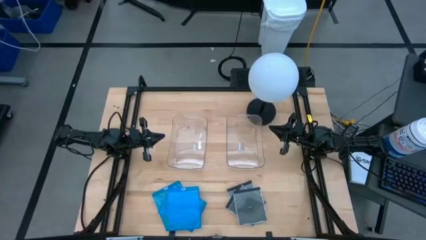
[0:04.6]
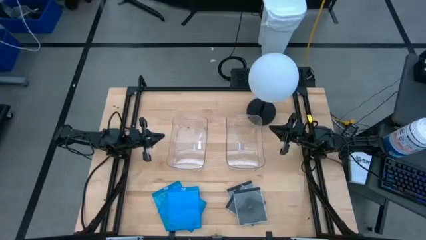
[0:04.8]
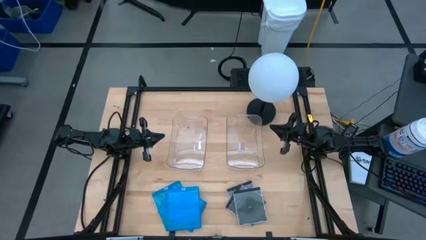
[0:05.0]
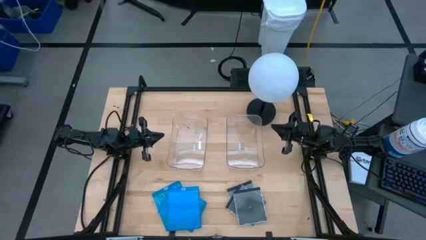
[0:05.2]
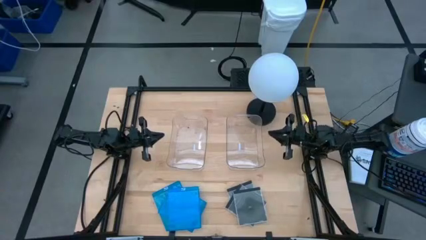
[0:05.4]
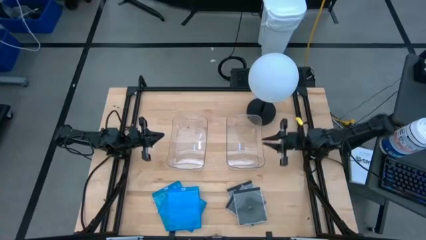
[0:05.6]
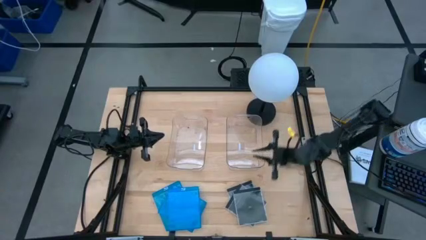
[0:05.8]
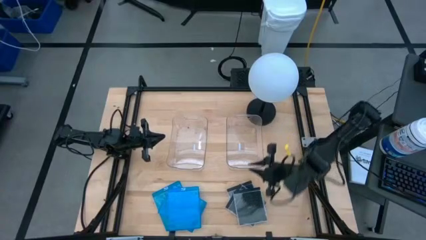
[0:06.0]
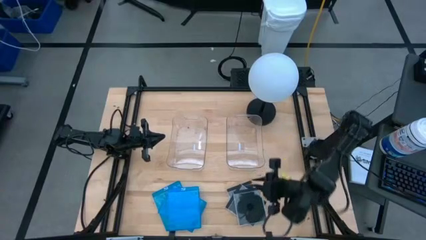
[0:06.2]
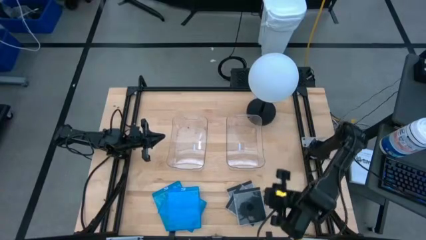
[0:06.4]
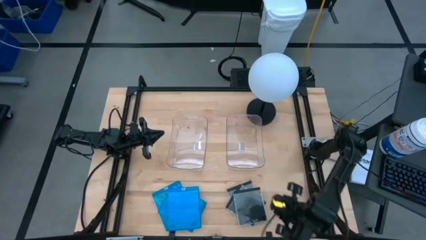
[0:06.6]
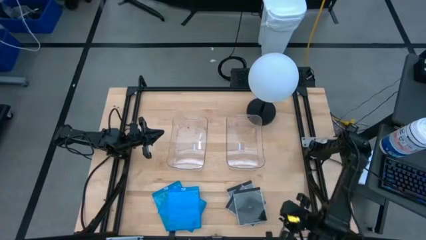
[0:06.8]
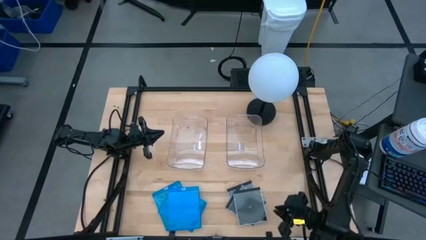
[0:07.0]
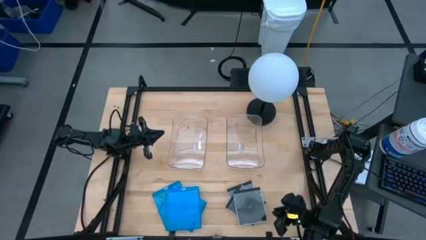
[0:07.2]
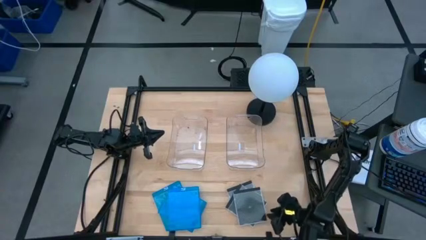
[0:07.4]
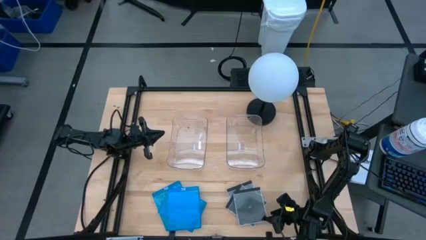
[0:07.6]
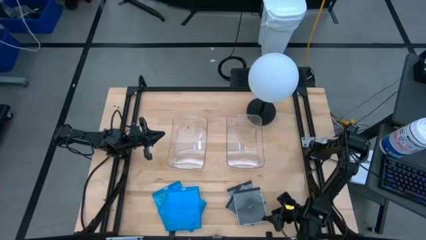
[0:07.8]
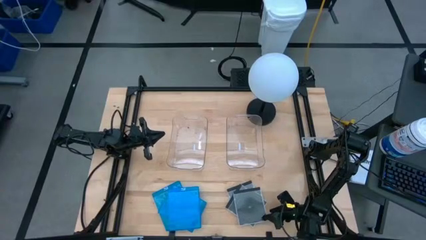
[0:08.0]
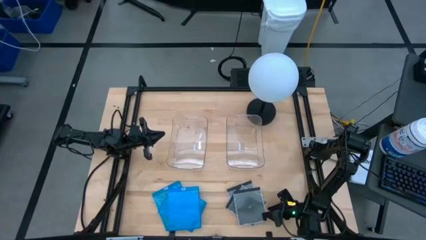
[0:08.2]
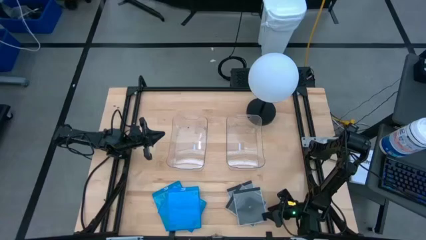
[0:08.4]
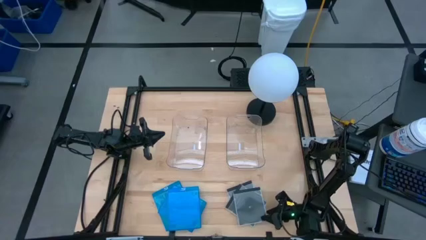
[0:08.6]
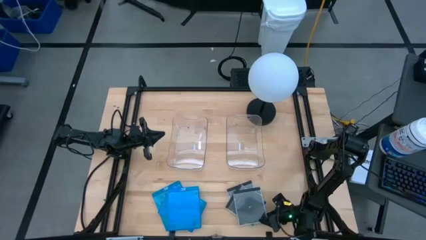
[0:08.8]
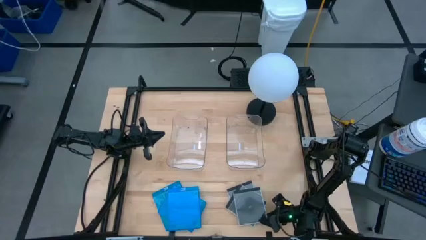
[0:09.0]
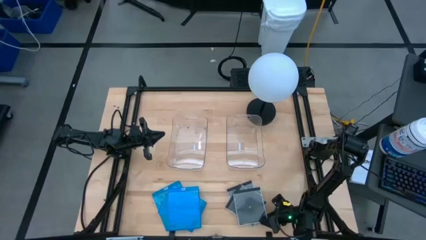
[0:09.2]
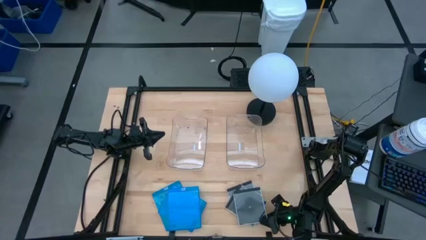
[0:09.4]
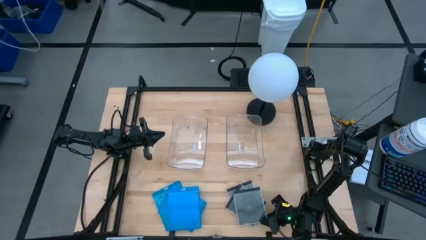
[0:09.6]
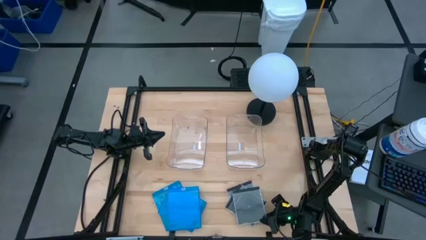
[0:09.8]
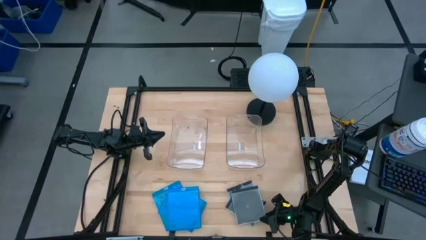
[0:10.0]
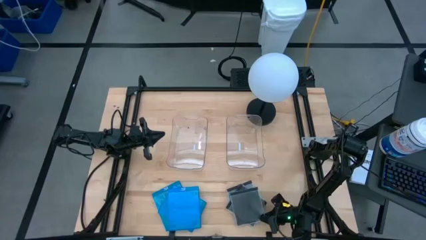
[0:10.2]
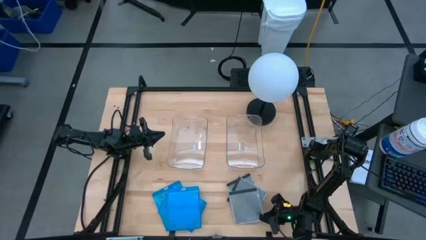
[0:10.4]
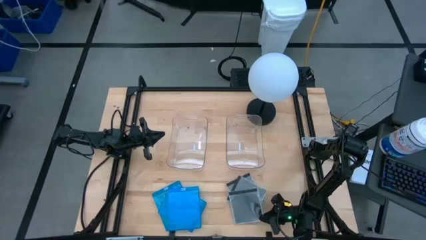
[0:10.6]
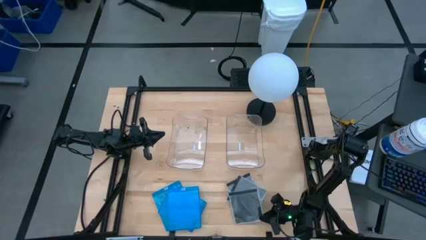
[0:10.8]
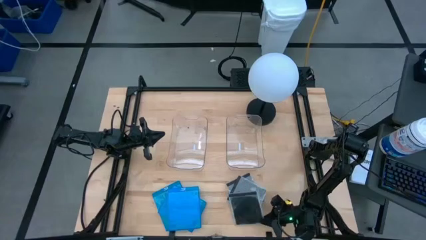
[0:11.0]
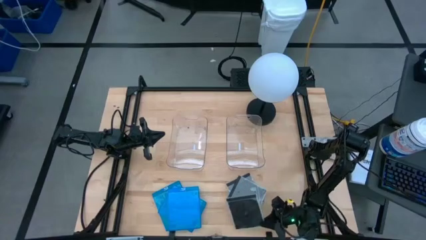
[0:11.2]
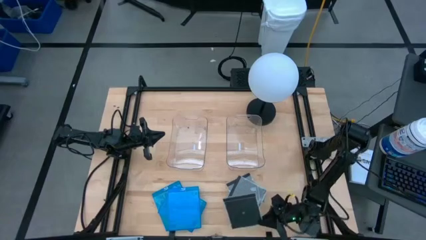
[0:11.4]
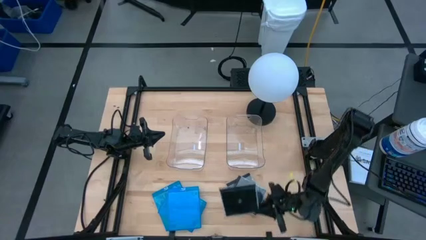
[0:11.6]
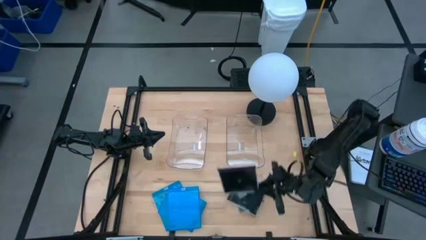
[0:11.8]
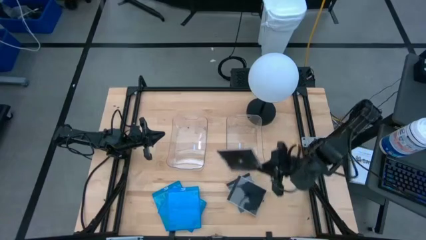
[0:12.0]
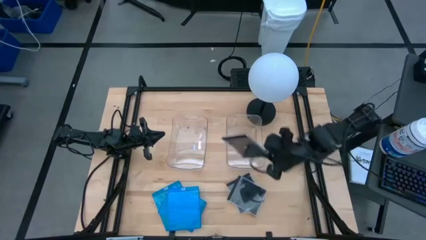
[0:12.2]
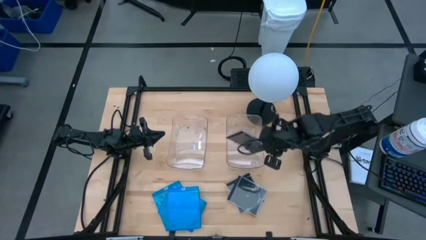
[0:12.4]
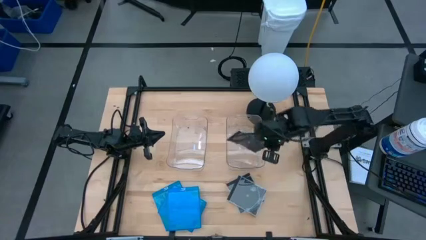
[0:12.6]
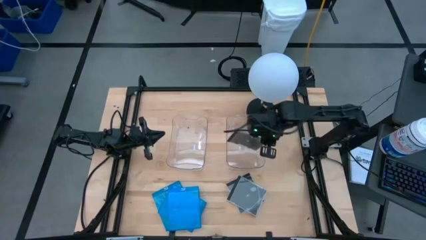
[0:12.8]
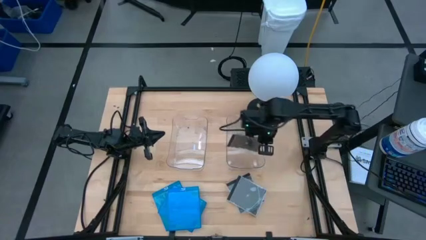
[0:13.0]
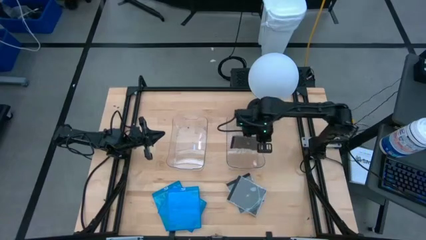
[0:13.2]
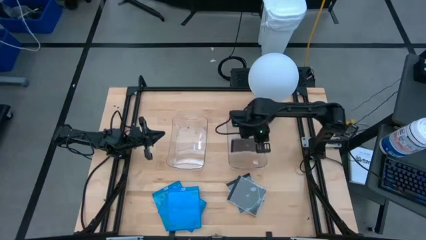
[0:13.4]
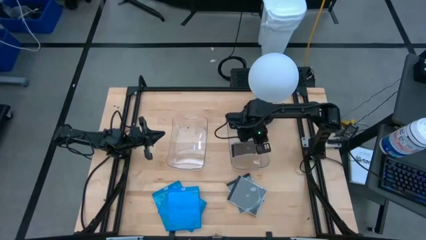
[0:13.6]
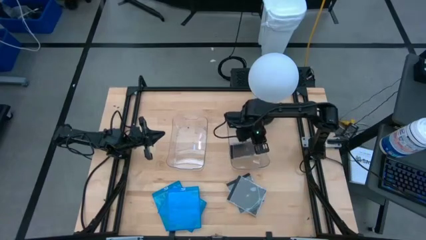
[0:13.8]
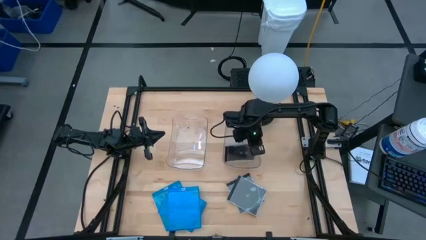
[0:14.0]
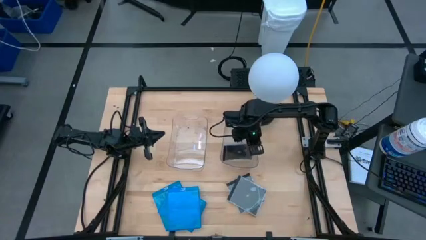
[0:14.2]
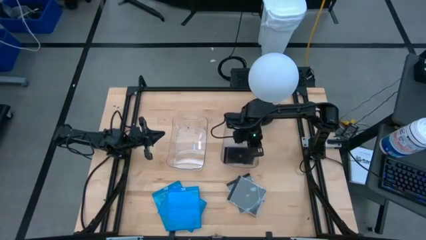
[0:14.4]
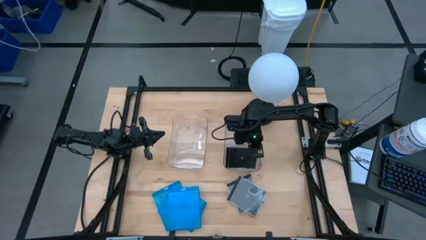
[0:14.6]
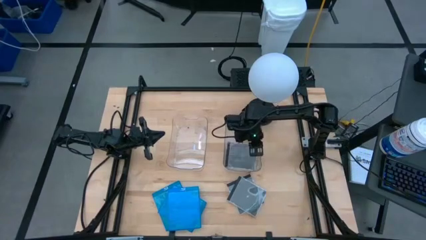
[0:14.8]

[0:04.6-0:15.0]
Task: Pick & place jewel cases by type
Put the black CD case into the right transparent bin
